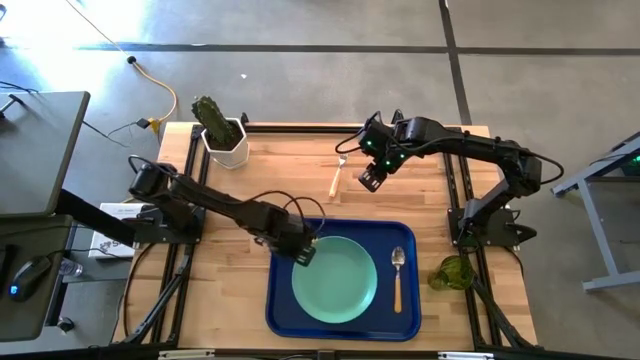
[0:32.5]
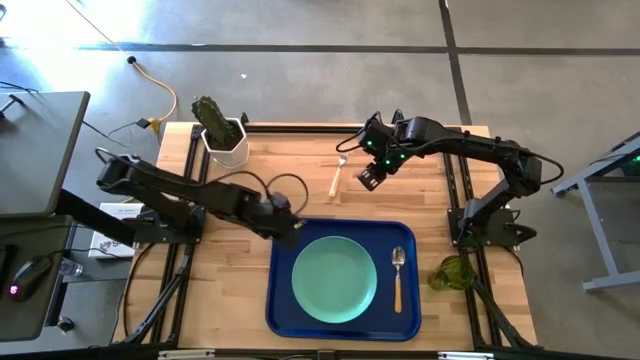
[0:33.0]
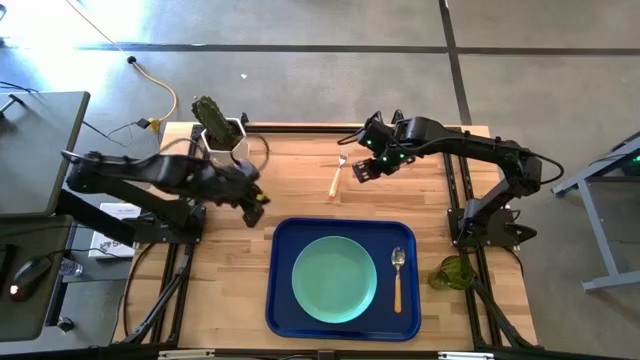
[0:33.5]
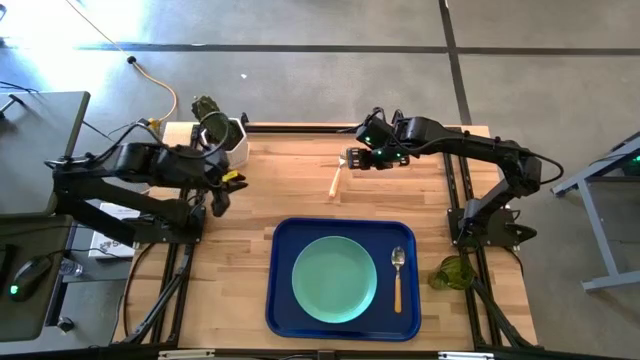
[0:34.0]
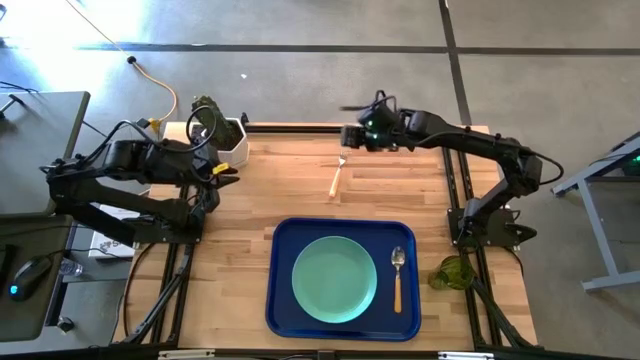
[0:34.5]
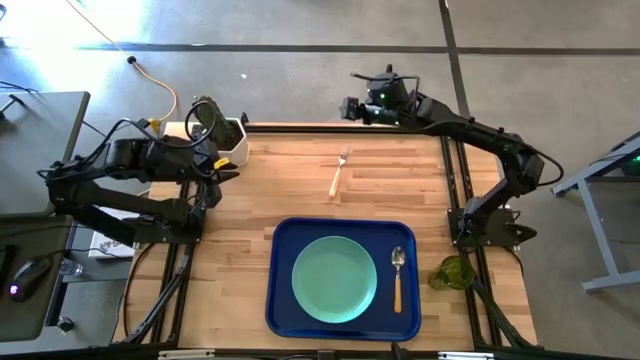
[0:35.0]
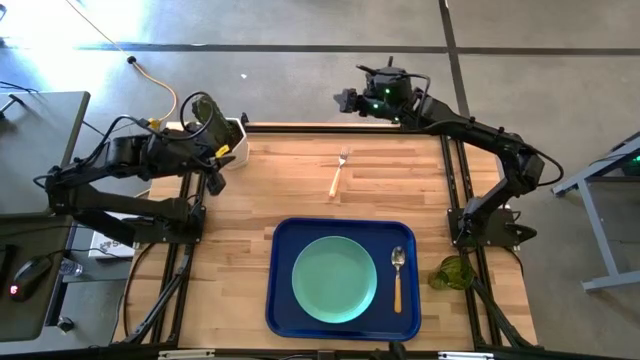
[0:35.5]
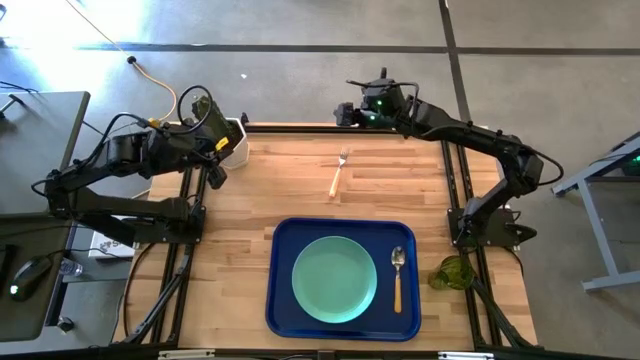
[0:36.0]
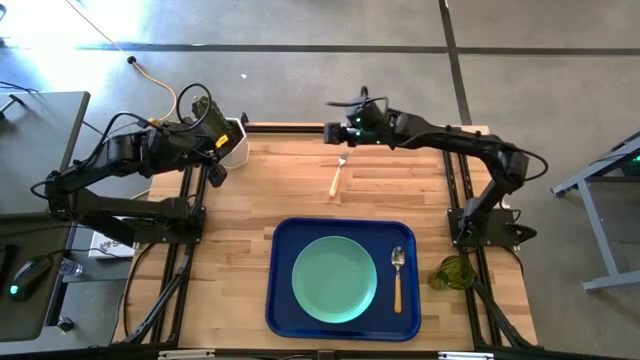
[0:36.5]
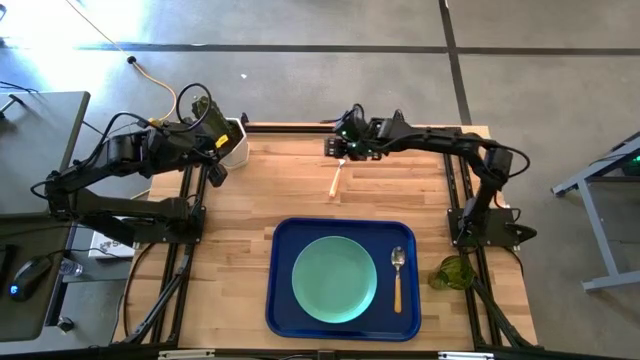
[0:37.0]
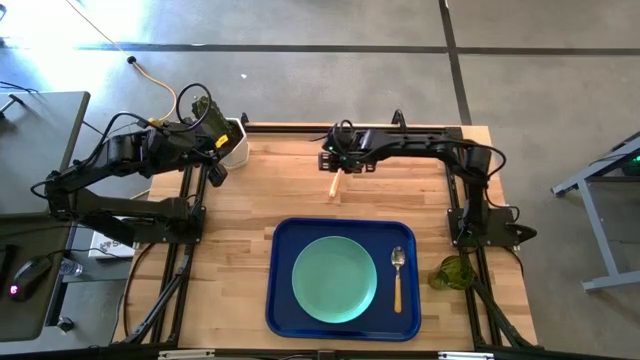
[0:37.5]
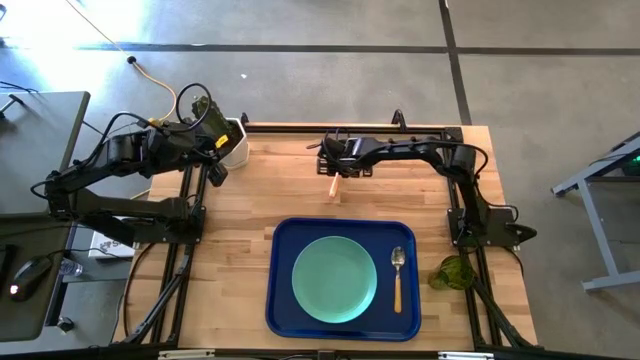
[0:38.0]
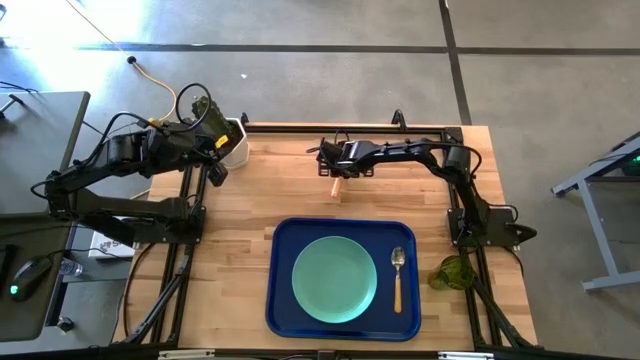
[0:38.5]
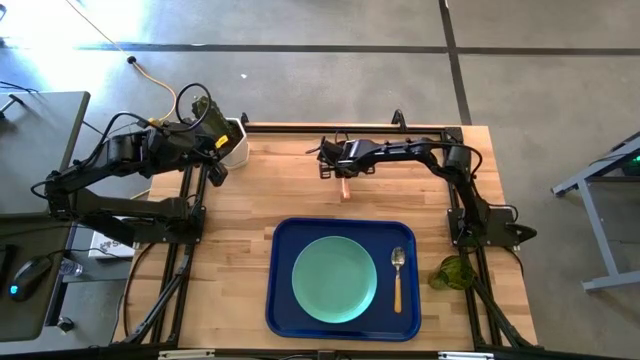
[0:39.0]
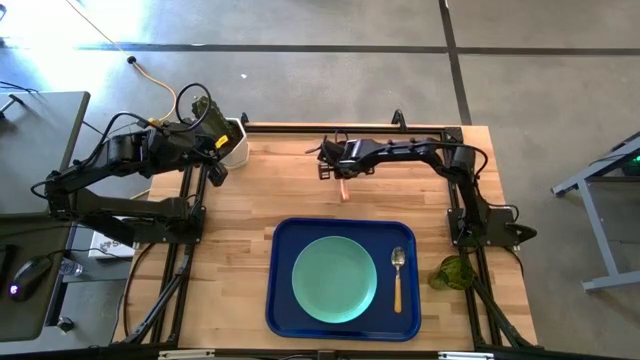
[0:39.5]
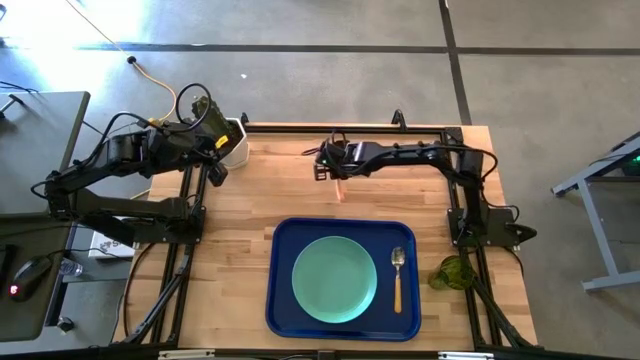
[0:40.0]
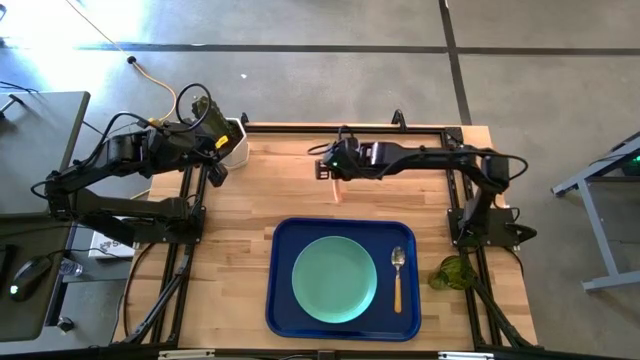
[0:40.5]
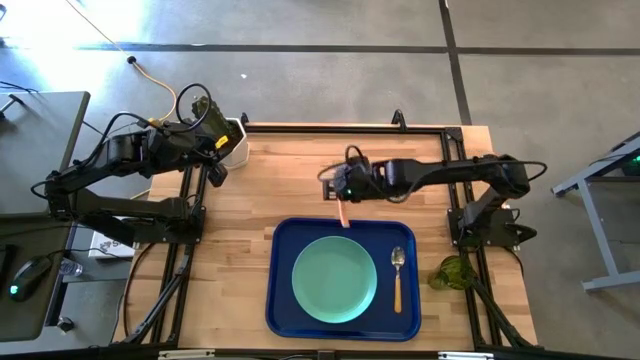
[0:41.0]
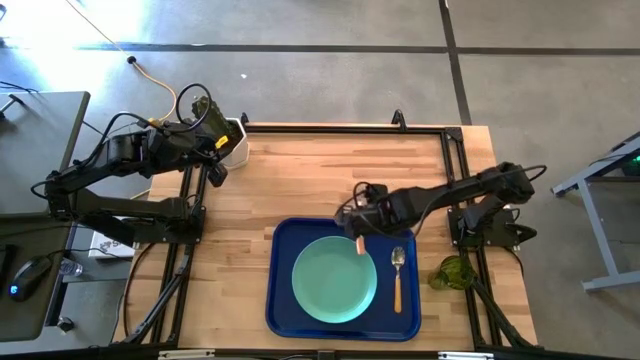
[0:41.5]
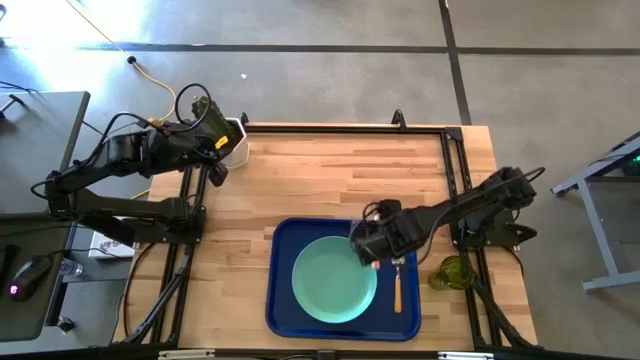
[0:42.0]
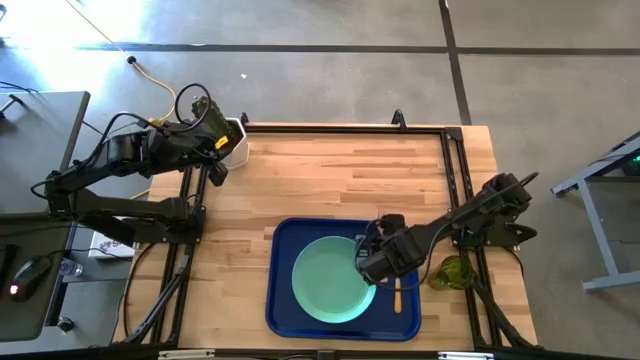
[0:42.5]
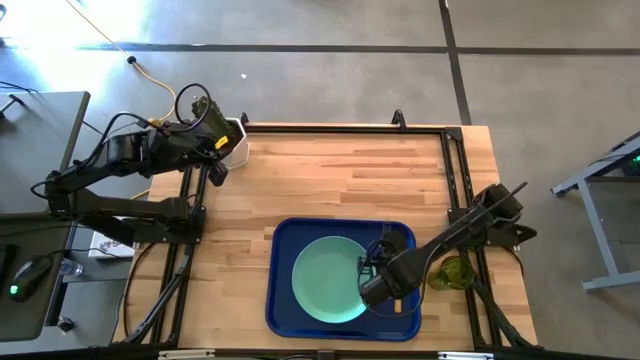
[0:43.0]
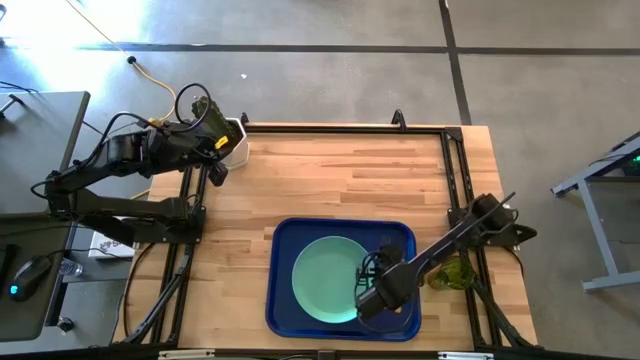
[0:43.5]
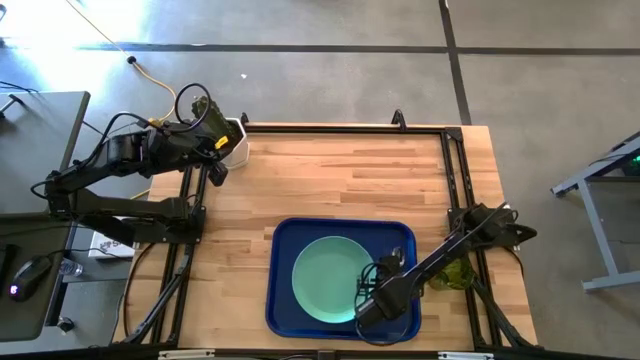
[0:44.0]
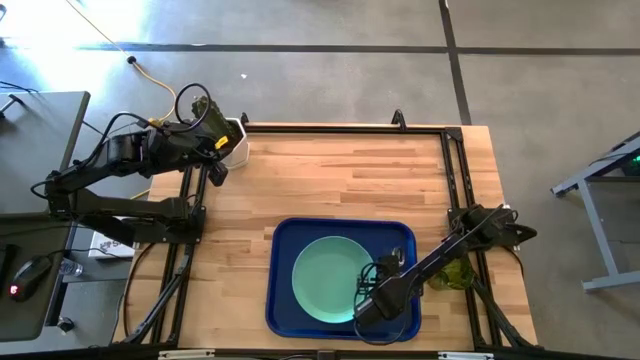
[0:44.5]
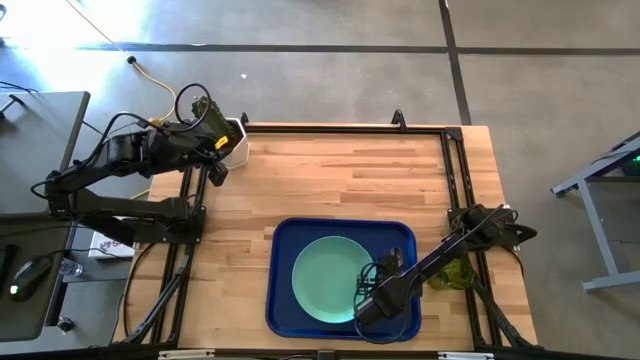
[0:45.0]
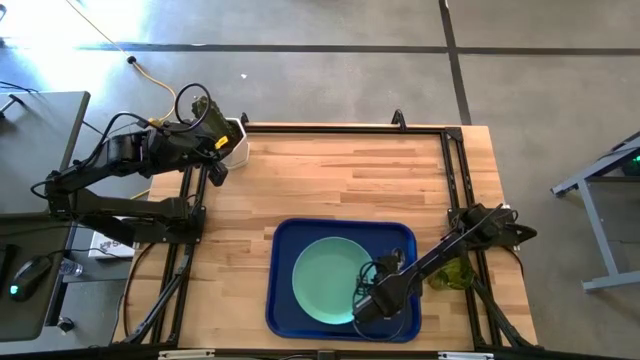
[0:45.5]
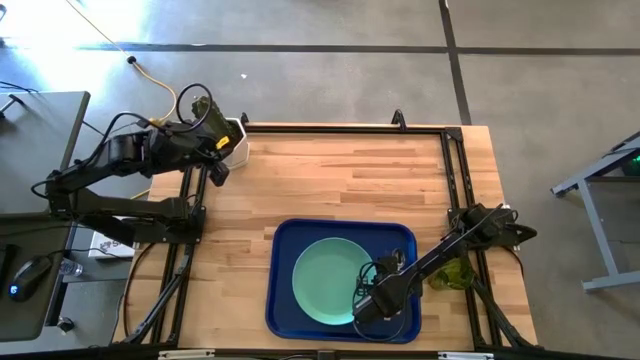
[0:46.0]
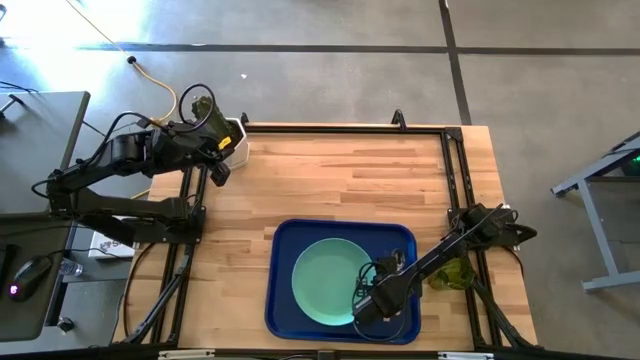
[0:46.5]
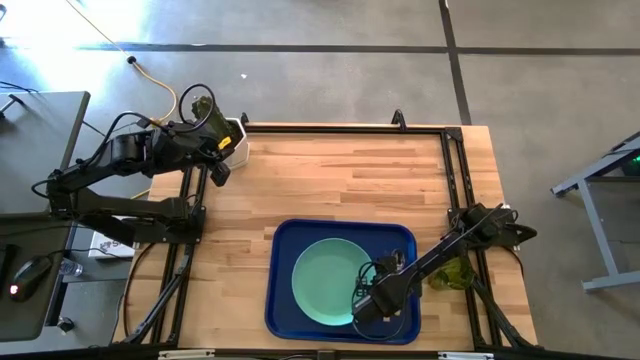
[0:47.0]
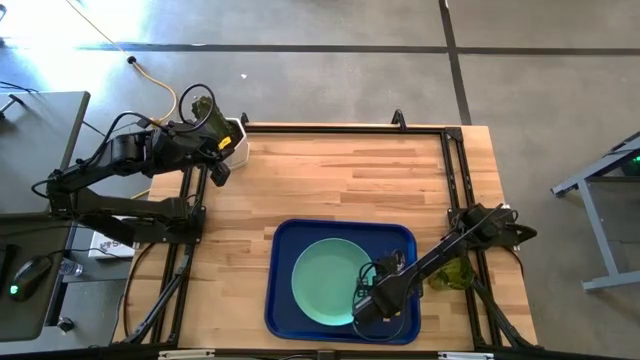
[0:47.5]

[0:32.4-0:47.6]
Task: Pick and place plate/cup/fork/spoon on tray
Put the light orange fork on the blue tray to the right of the green plate

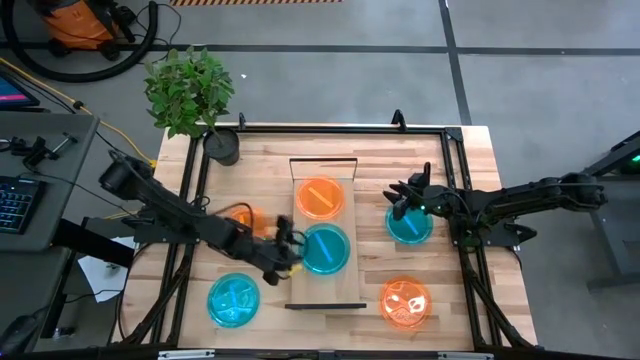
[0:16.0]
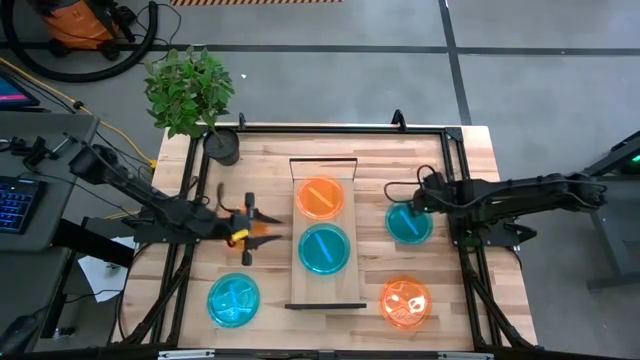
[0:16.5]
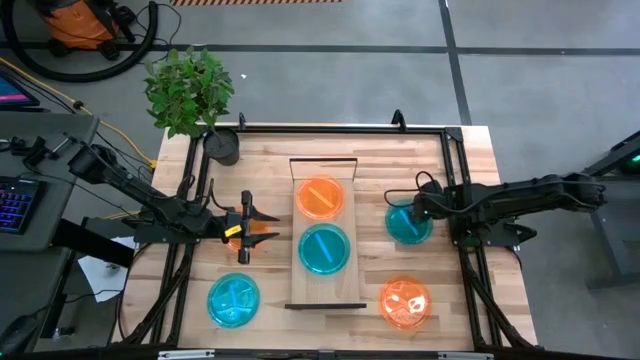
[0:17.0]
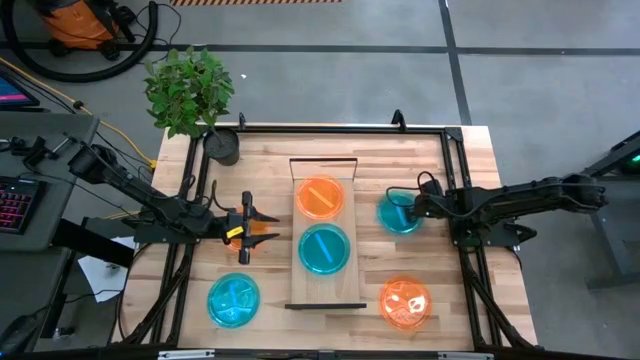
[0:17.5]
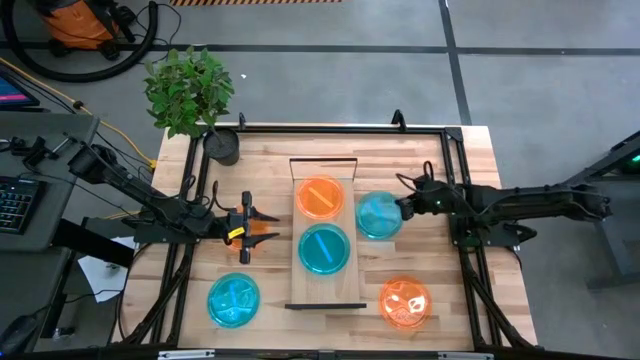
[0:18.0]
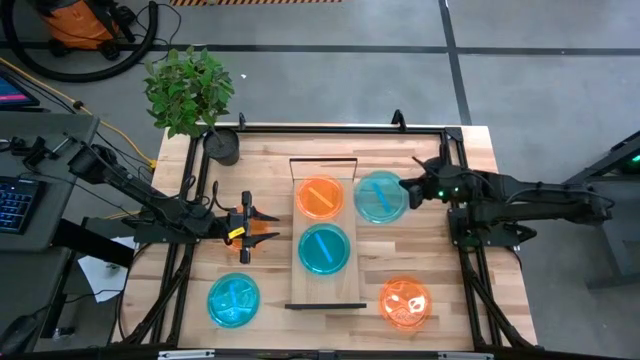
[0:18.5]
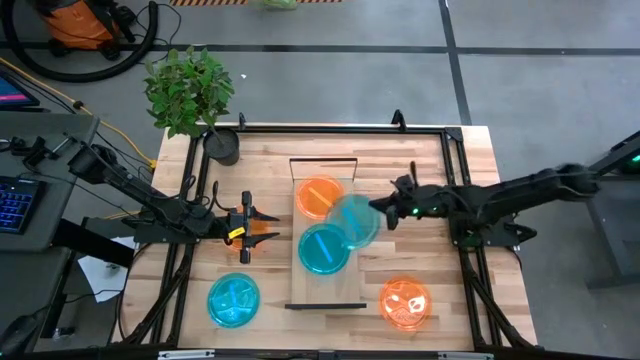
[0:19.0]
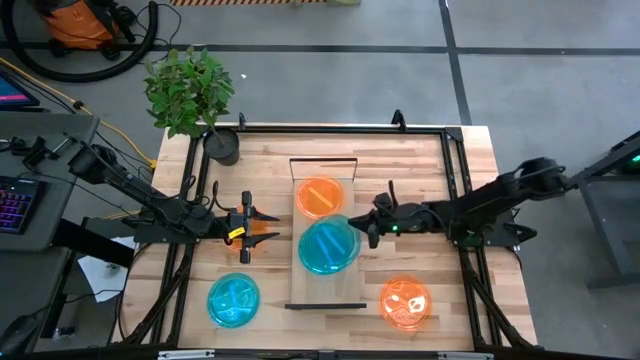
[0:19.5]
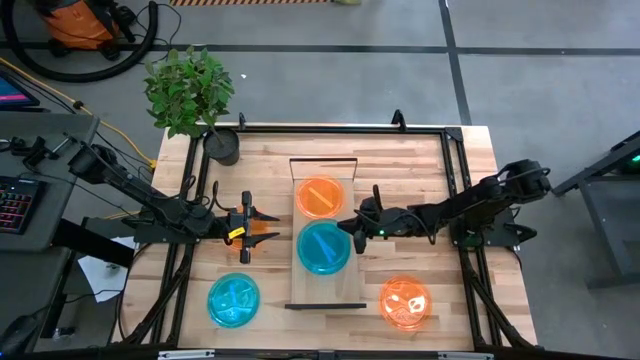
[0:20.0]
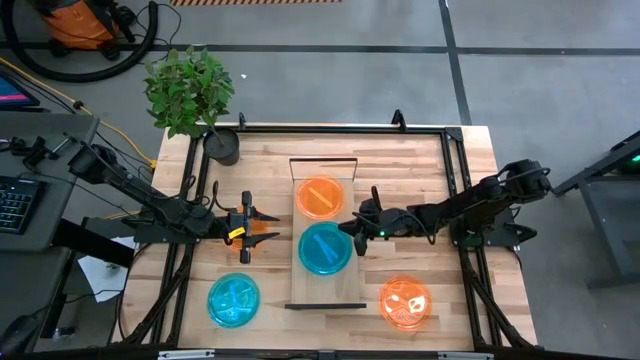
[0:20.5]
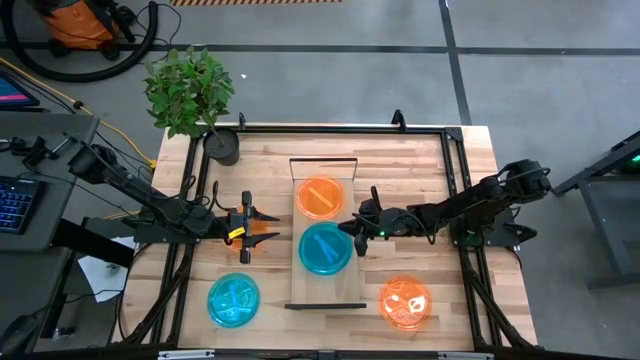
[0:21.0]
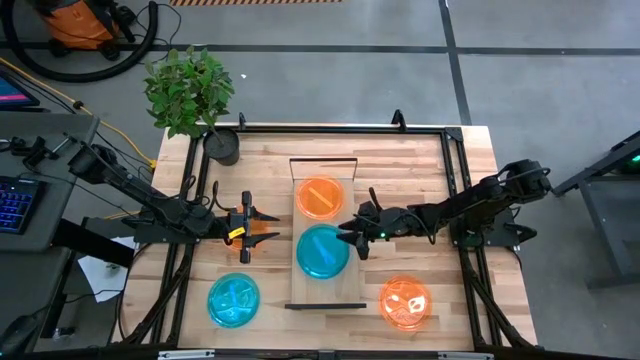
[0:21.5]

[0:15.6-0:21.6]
Task: Place and stack plates onto a shelf
Stack the right blue plate on top of the blue plate on the shelf
